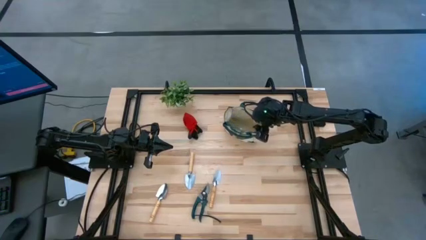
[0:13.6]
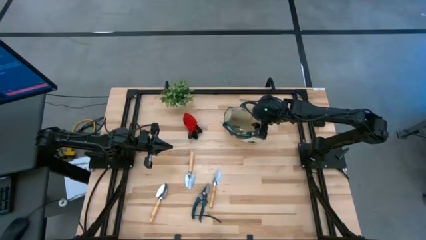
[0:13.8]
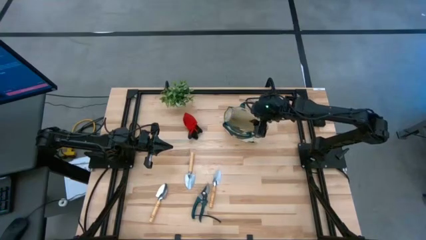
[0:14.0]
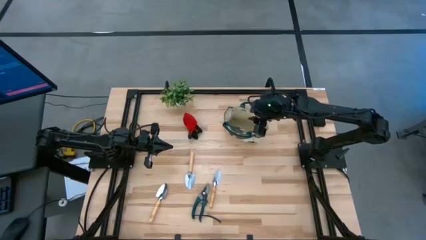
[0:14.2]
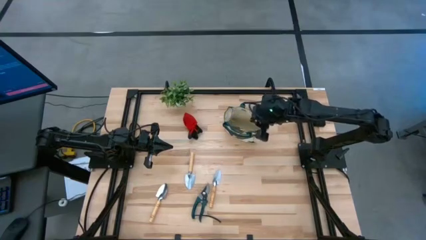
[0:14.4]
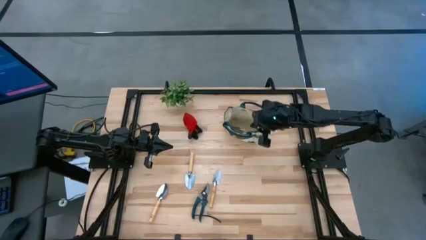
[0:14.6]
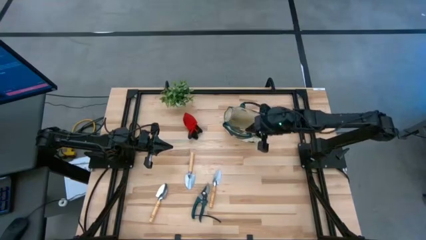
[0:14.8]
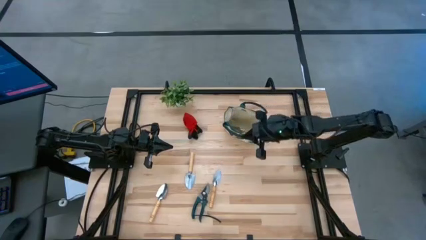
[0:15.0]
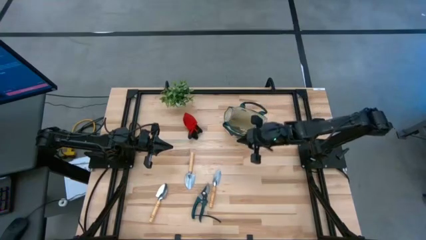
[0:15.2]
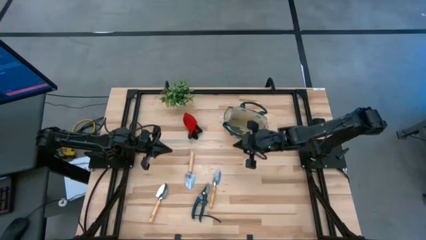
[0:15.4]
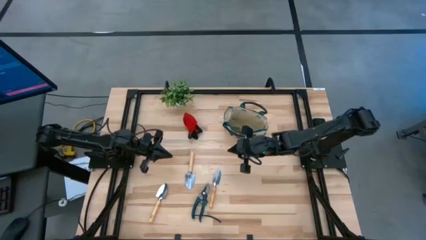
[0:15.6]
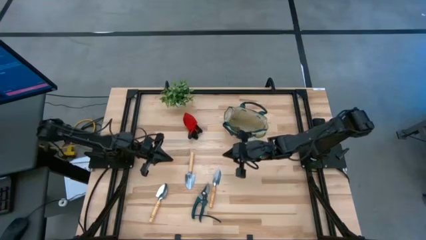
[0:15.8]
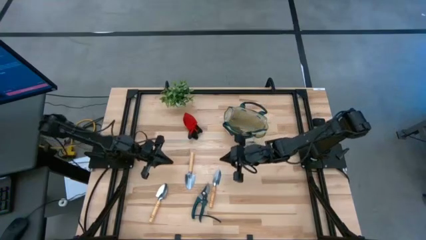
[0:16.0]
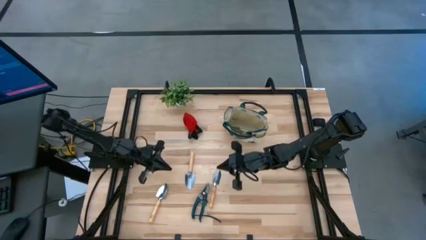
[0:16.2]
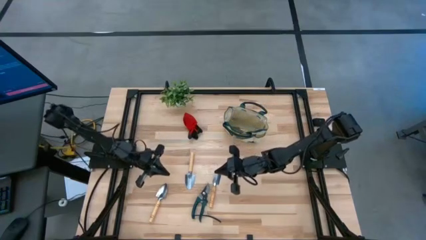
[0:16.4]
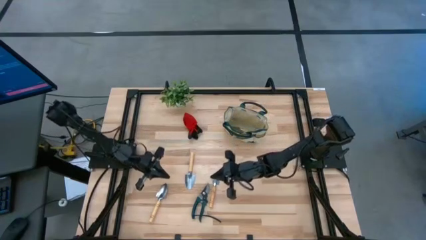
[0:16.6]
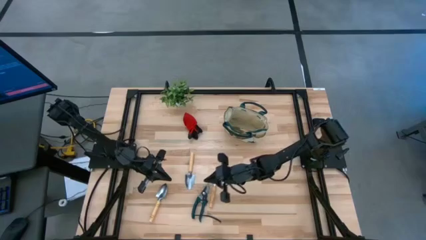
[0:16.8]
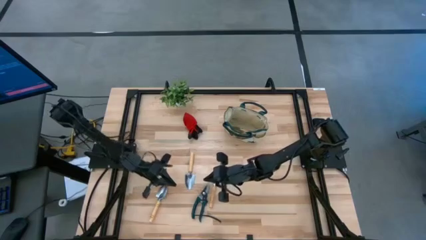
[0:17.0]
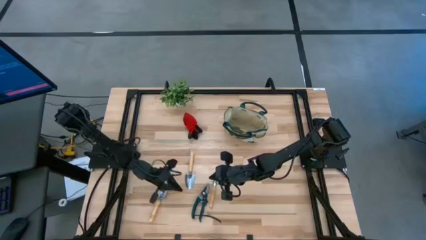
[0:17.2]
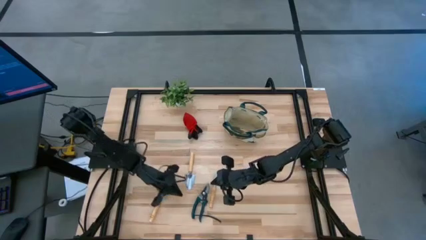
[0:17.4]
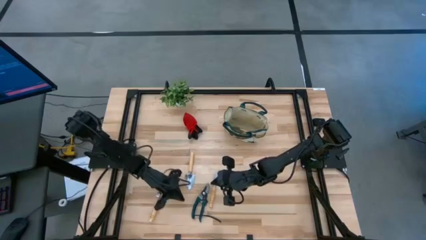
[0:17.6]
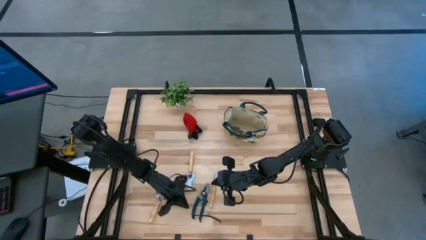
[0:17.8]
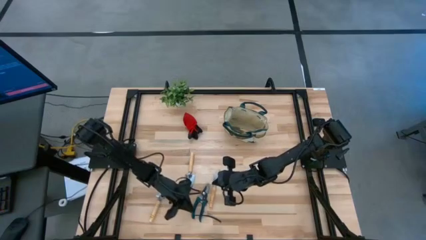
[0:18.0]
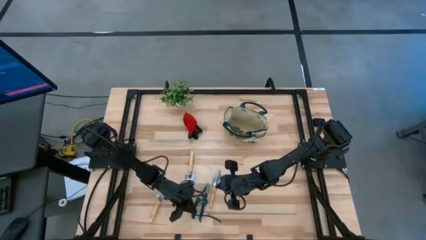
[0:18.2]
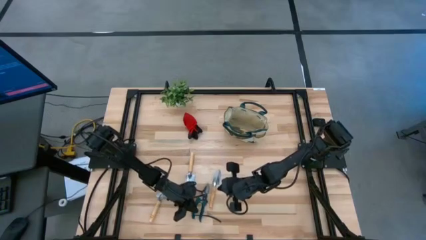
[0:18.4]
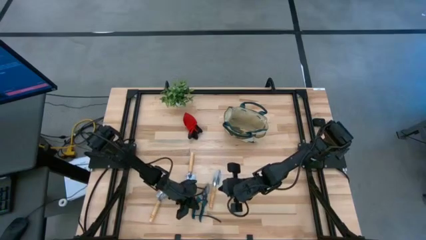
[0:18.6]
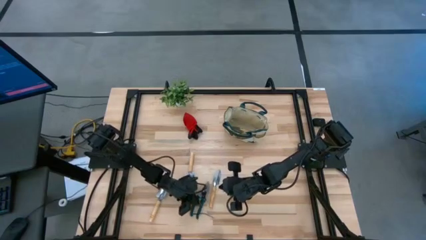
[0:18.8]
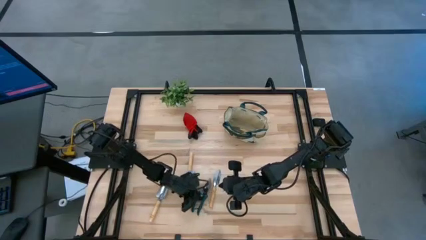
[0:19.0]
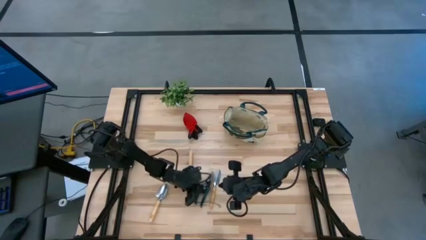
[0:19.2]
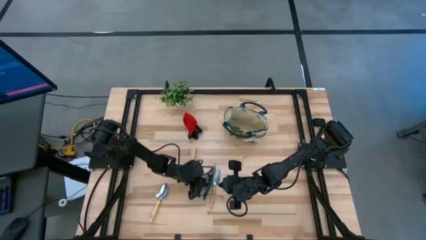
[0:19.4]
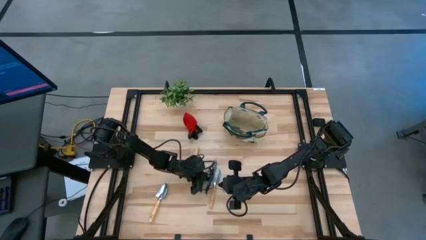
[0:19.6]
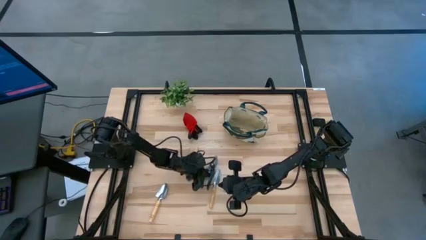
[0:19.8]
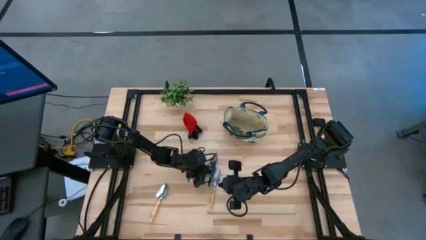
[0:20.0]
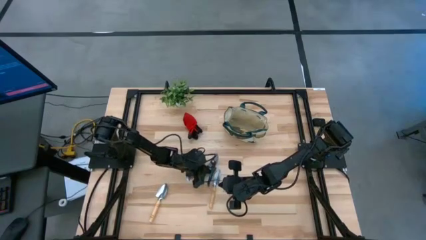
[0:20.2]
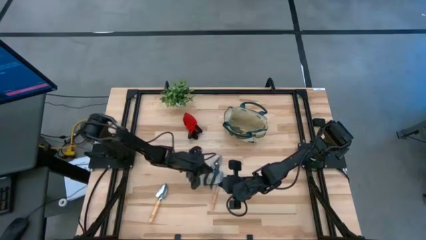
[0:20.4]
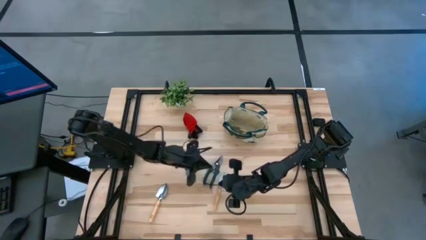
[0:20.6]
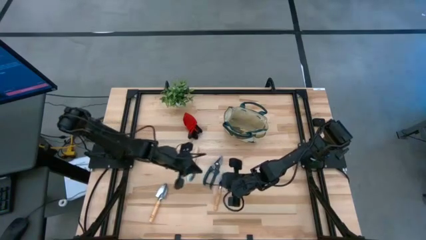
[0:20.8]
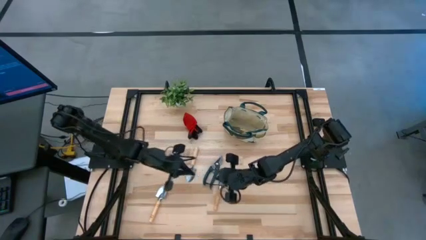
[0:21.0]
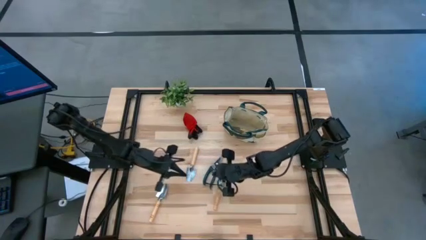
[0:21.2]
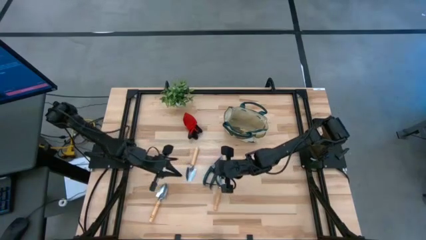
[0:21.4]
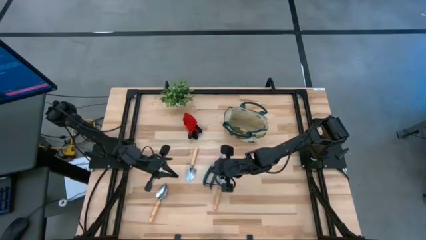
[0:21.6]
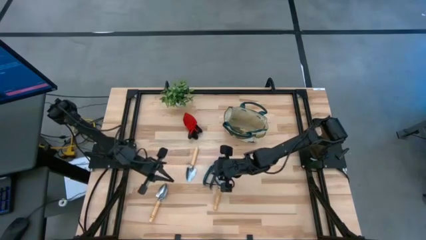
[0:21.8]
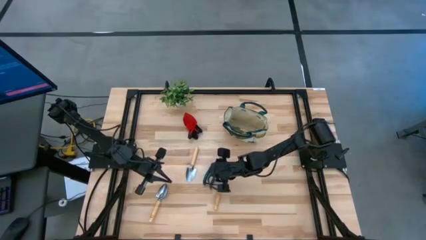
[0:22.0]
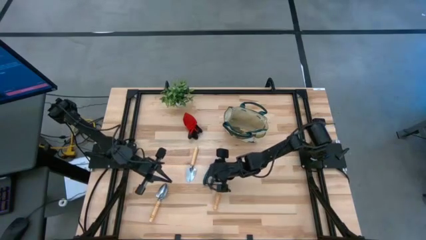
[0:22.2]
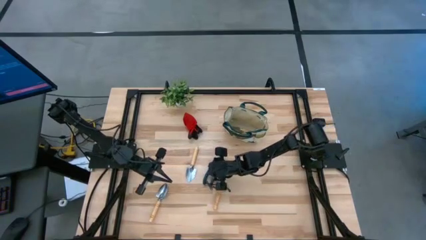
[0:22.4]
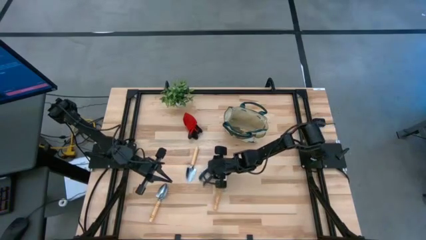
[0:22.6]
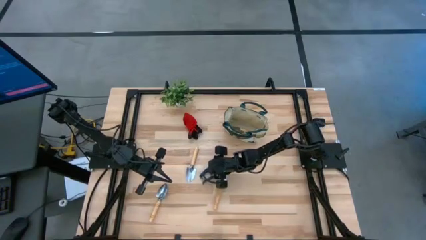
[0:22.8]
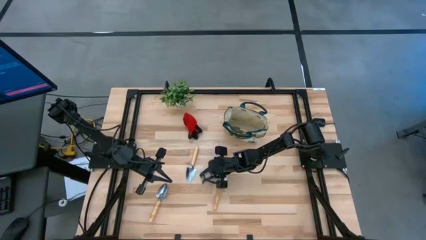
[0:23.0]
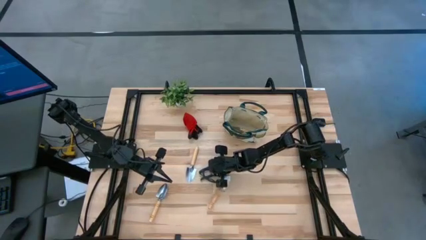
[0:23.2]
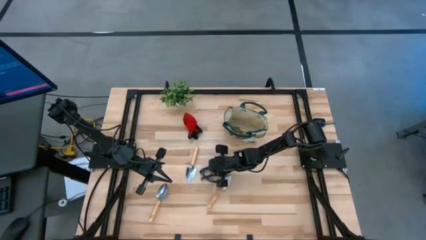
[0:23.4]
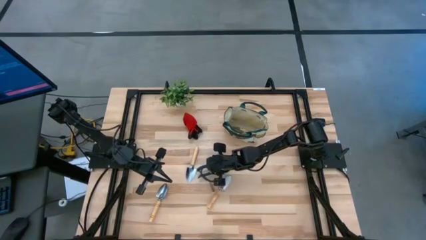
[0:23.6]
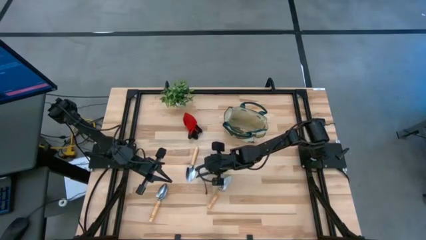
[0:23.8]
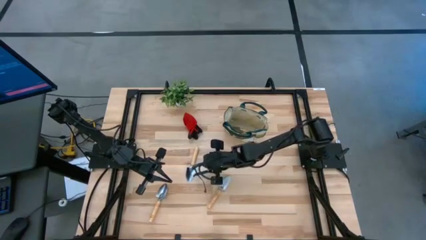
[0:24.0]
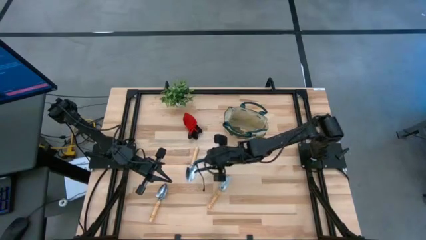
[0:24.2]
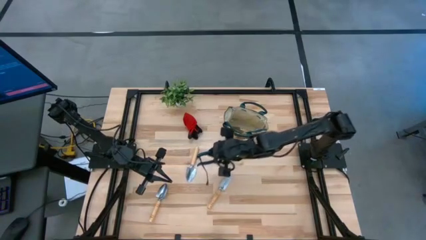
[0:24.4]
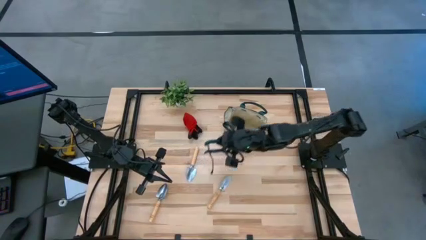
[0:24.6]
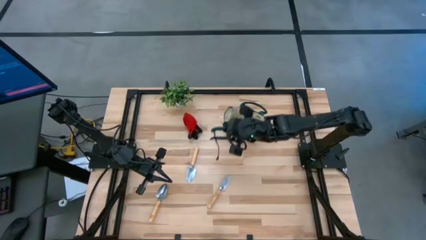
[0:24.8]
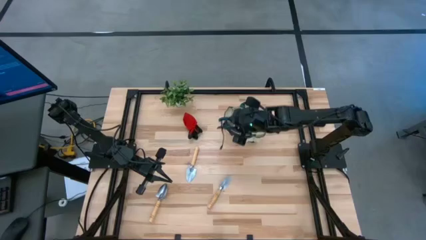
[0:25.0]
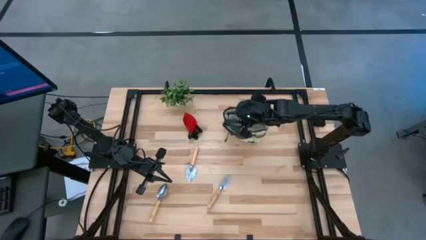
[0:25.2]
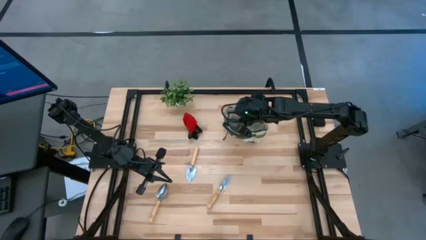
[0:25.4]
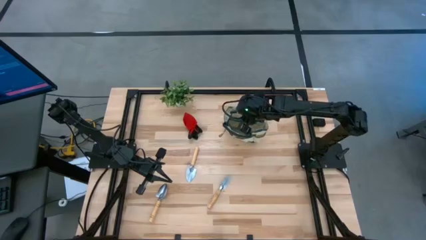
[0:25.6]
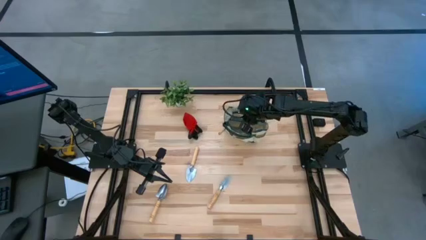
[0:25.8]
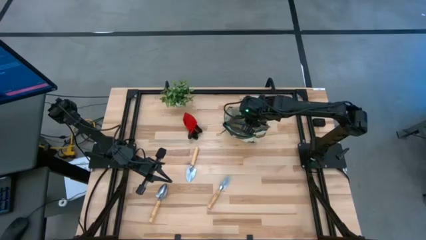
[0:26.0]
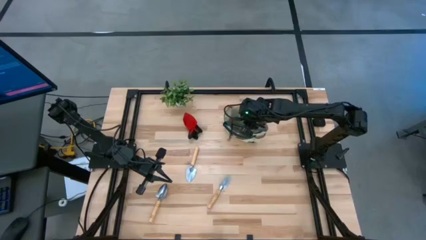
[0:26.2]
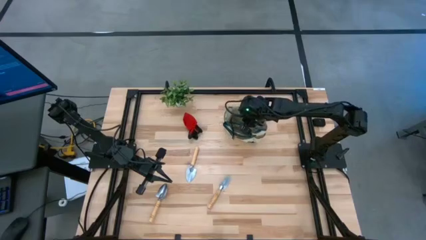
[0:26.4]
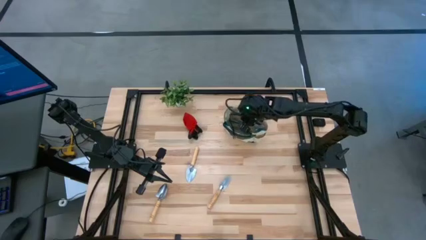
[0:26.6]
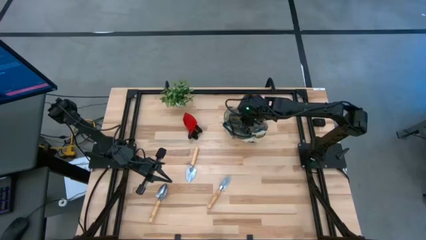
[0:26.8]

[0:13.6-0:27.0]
Task: Pick & Place Garden tools in Gardening bag
Put the shear scissors into the gardening bag

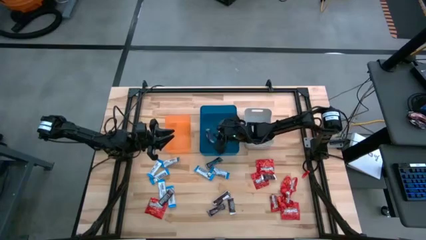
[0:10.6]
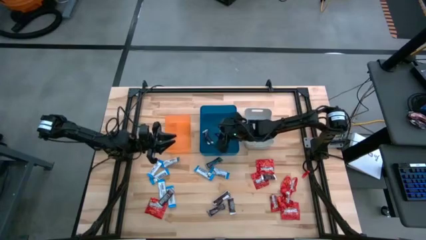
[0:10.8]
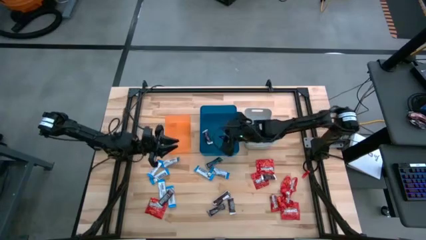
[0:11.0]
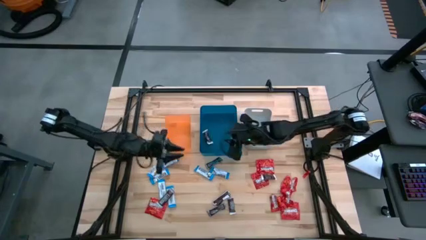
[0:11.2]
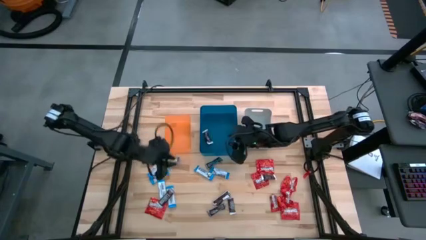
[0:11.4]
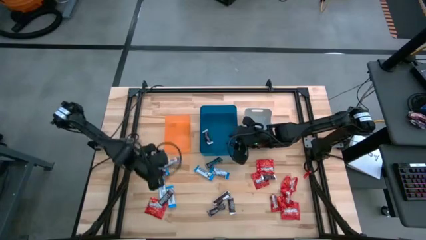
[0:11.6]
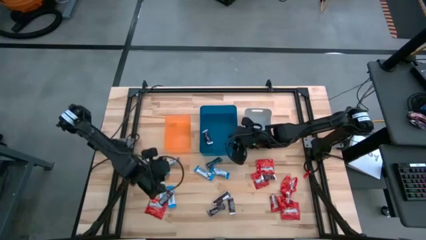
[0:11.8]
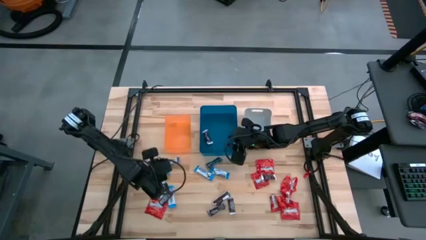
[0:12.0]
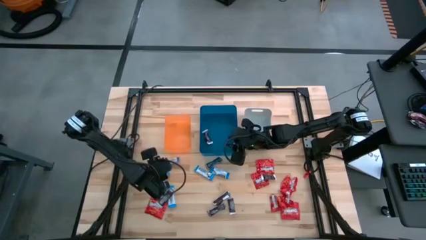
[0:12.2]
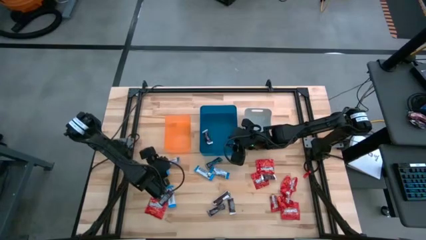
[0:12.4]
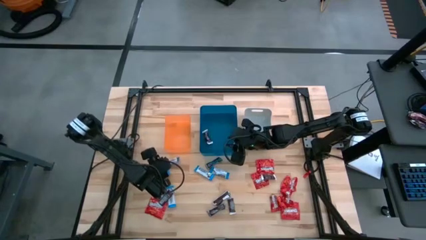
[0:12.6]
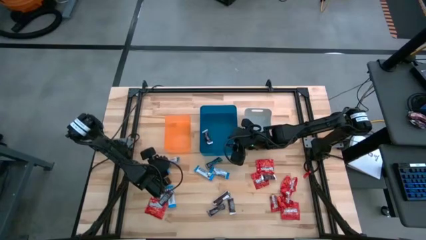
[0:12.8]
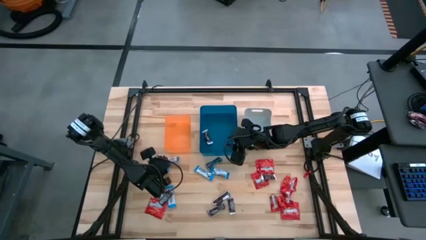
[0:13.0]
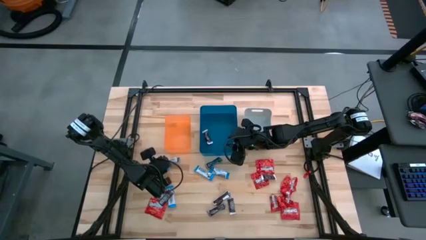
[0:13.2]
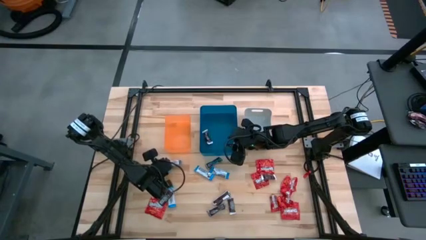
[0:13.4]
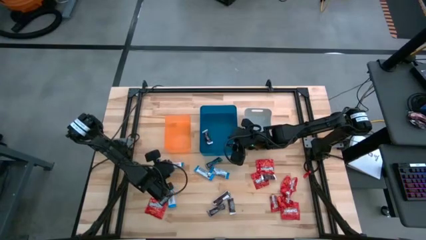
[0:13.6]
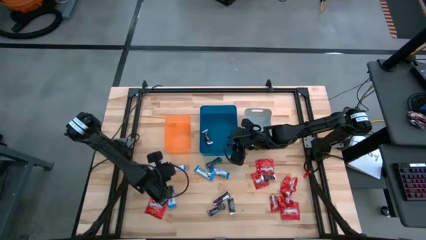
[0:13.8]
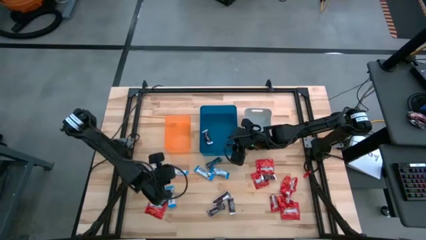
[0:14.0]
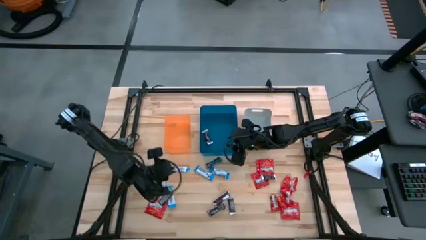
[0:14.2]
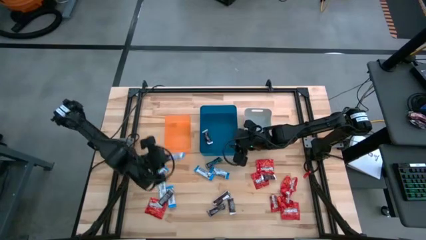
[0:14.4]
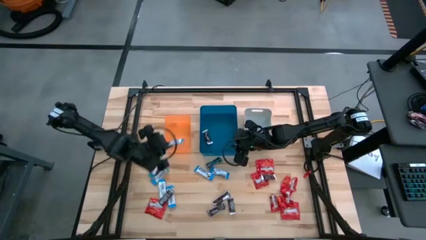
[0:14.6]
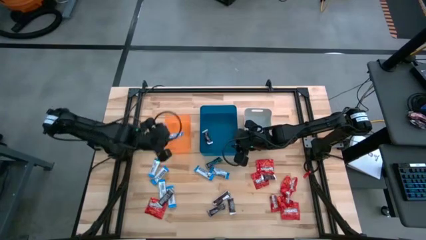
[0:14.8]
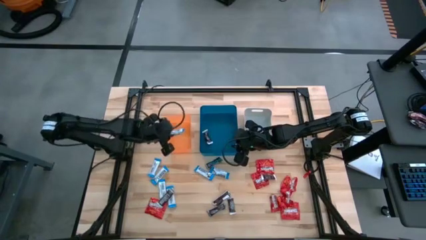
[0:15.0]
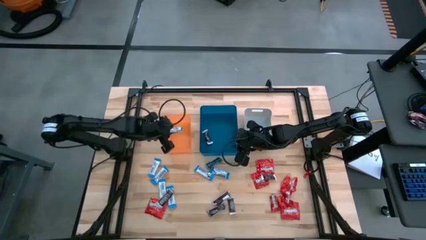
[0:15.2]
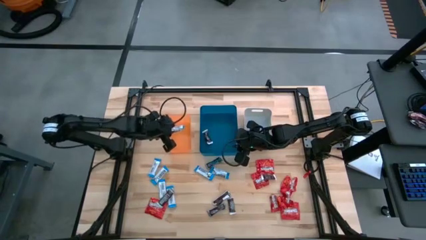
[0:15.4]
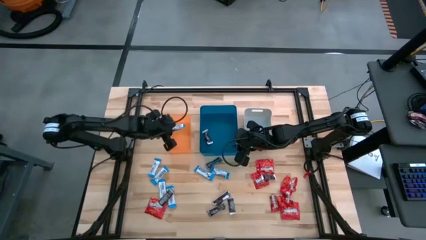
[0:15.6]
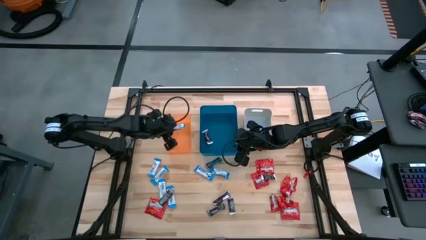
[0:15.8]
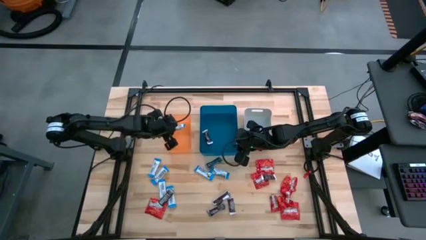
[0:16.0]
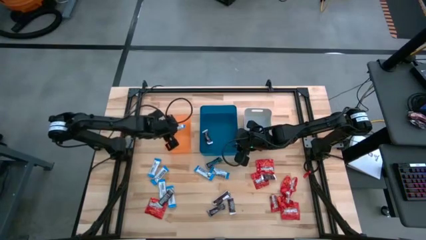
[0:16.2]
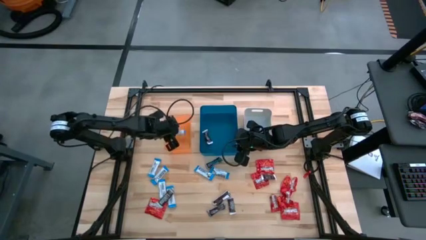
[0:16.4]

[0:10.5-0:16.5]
Task: Sort candy
Put the white chocolate bar into the orange bin
